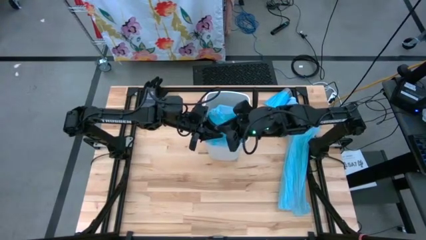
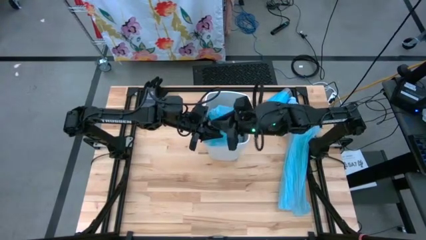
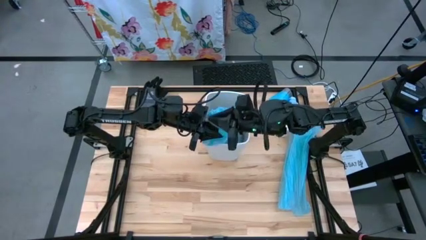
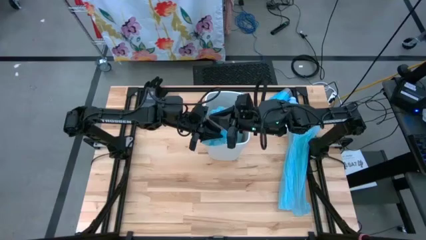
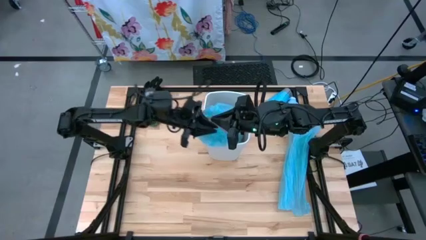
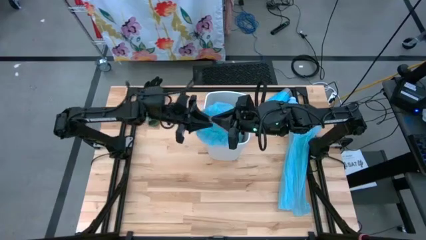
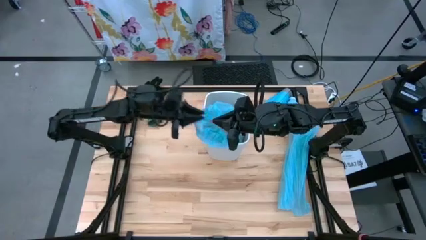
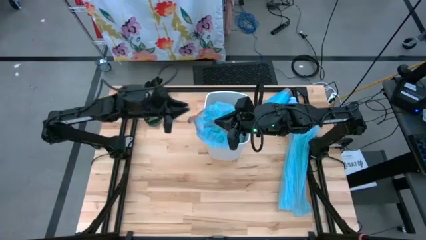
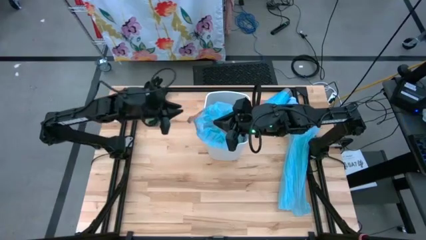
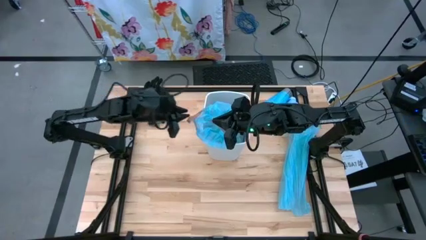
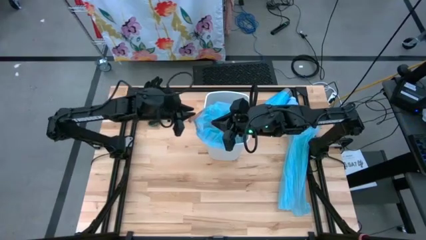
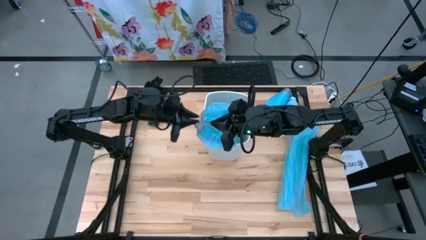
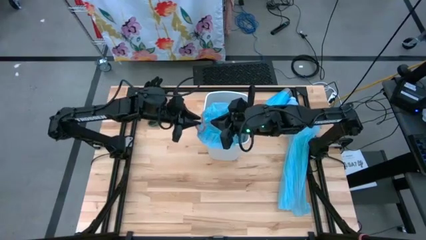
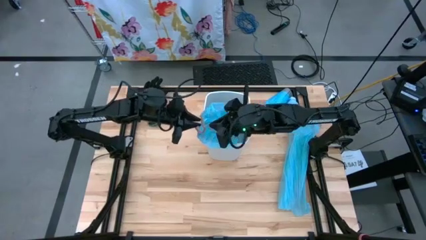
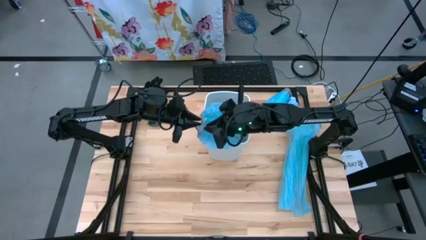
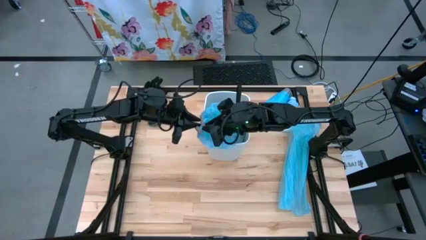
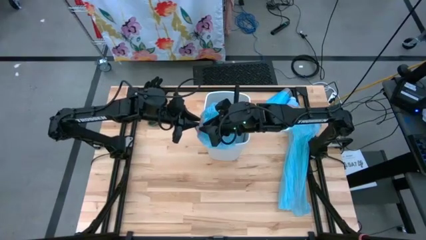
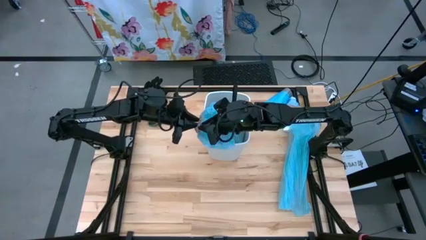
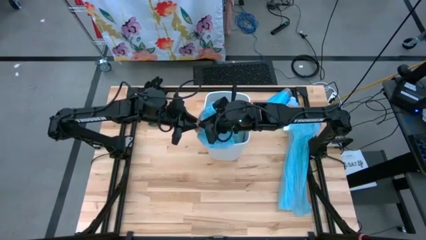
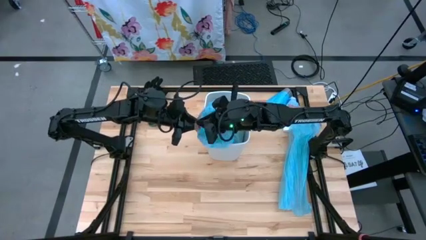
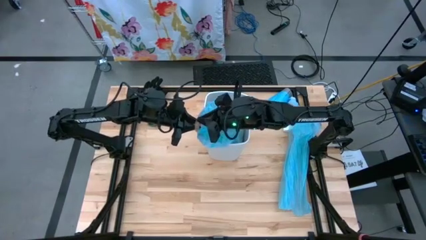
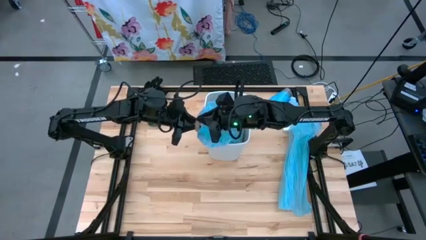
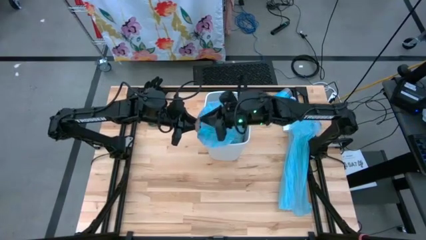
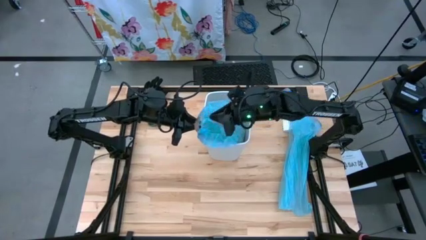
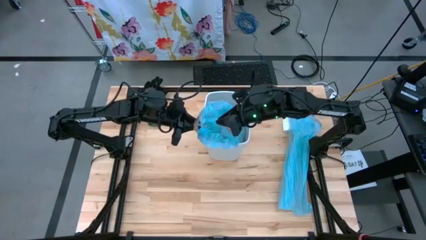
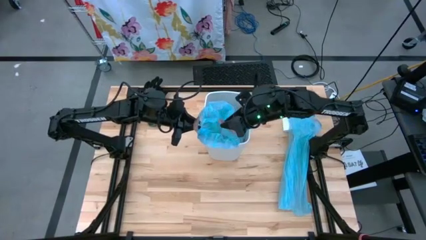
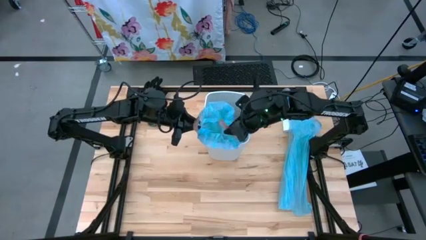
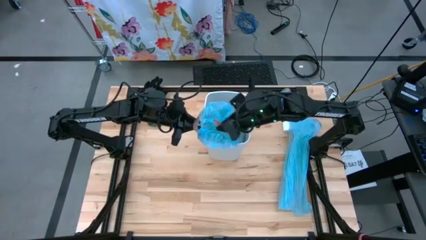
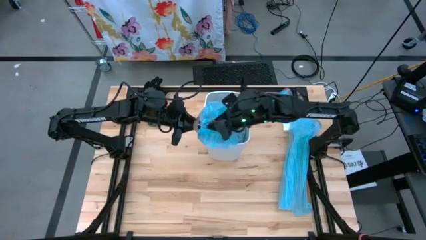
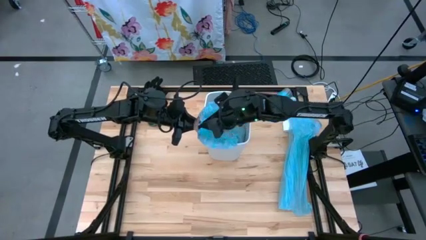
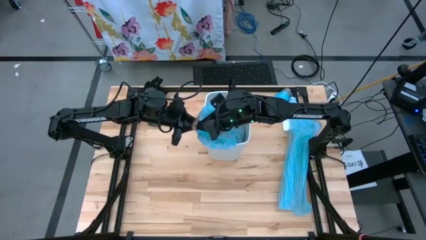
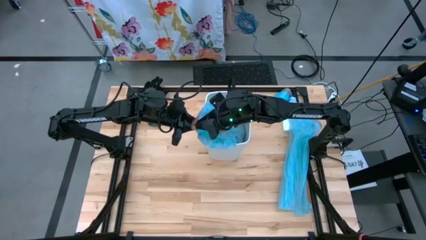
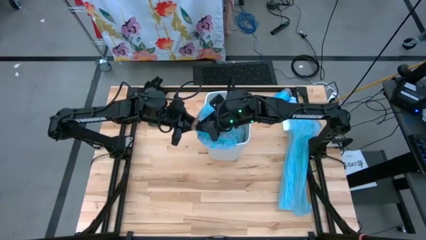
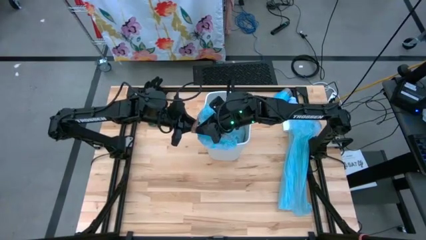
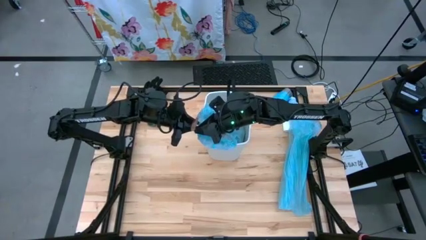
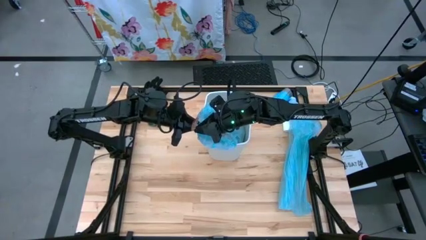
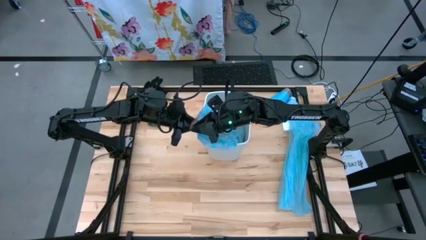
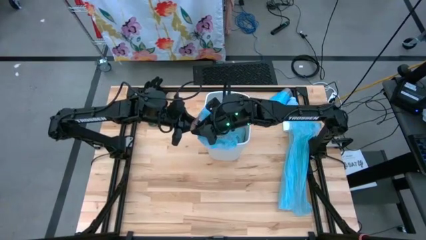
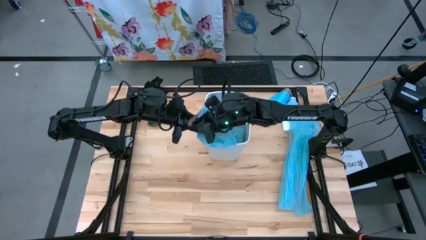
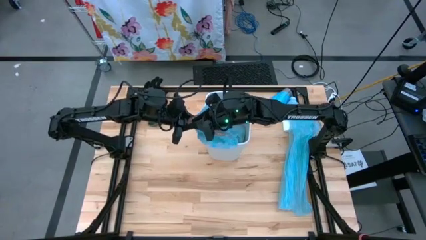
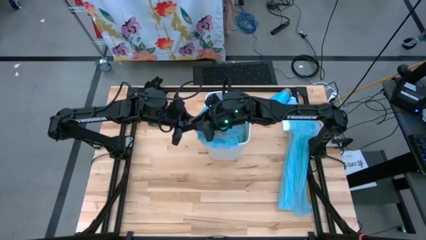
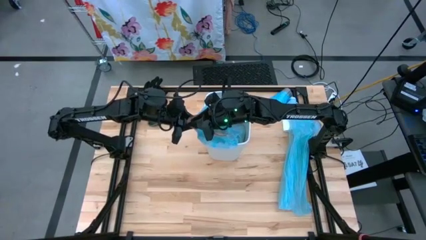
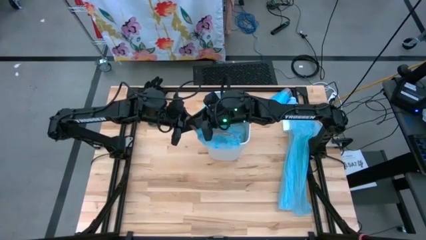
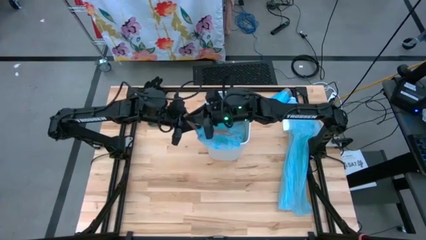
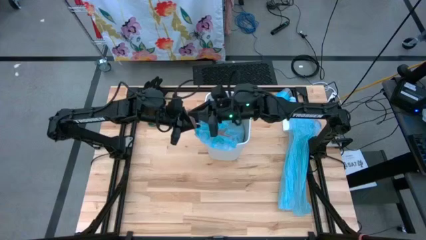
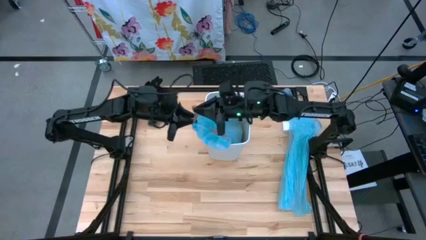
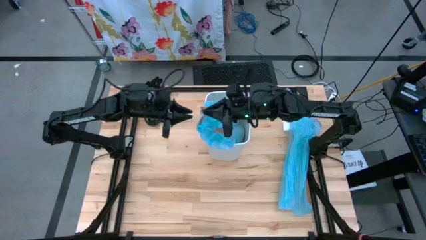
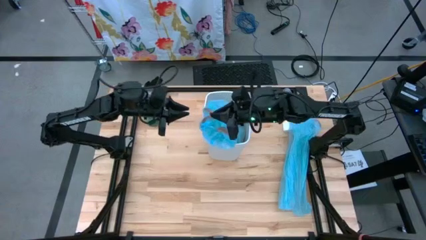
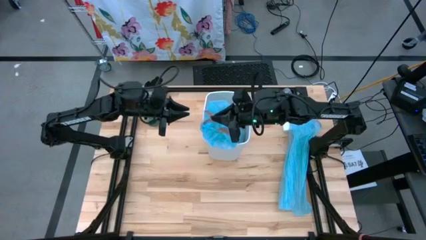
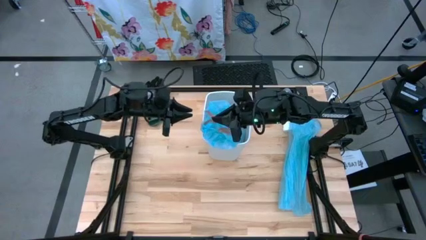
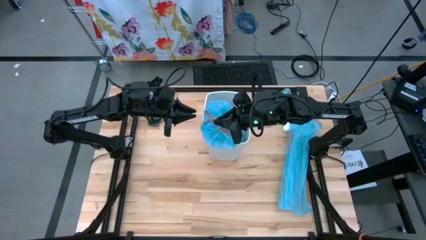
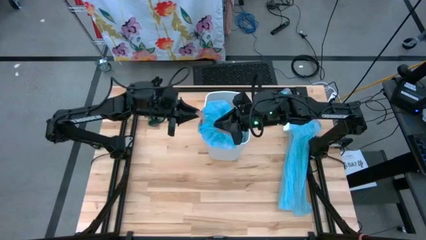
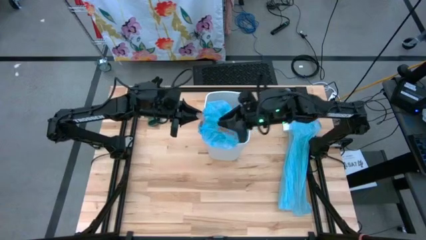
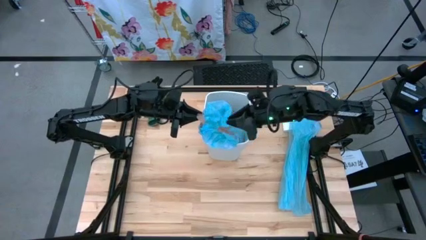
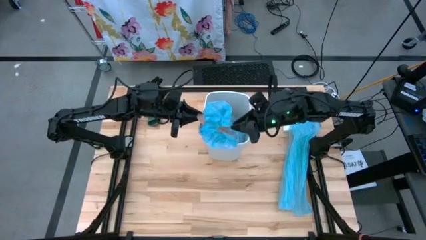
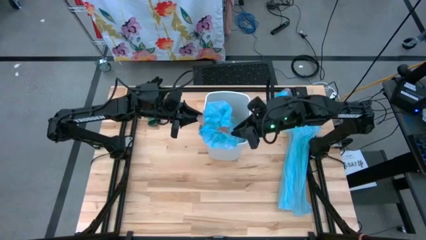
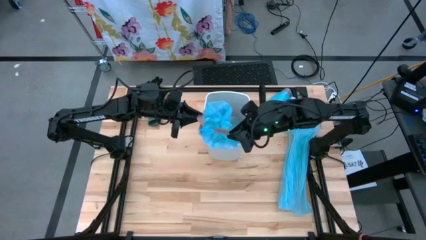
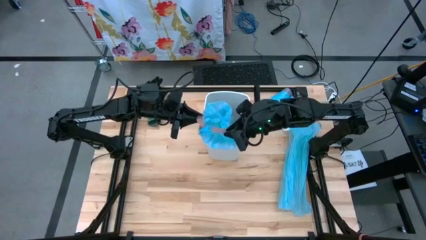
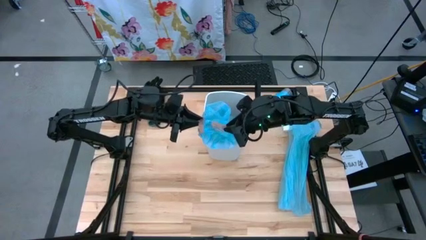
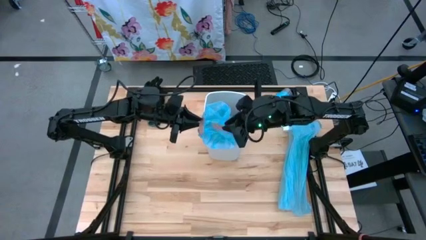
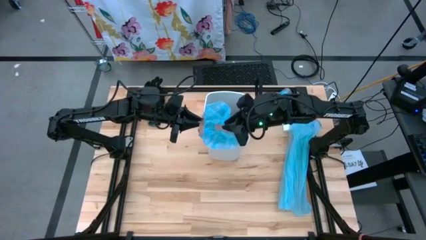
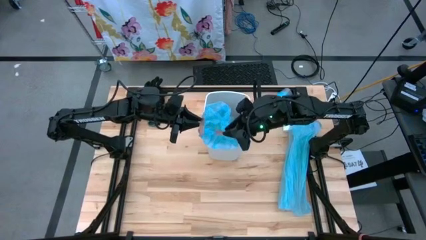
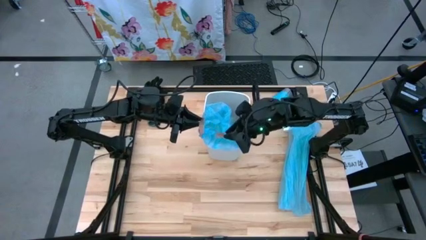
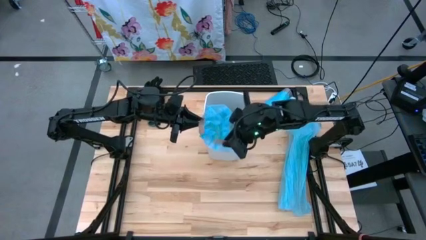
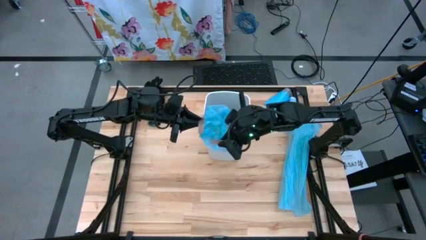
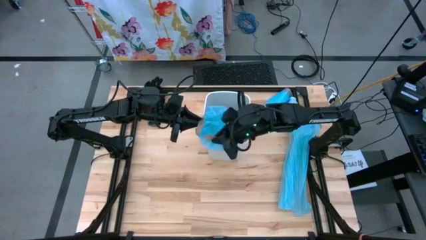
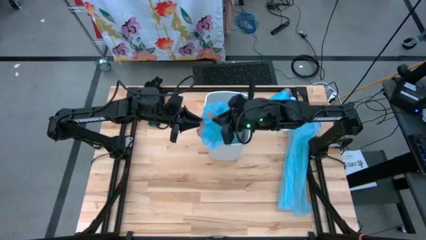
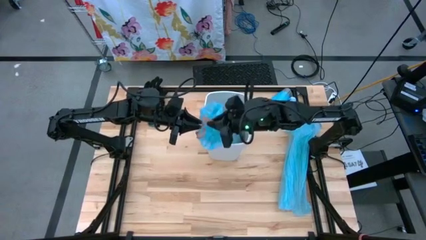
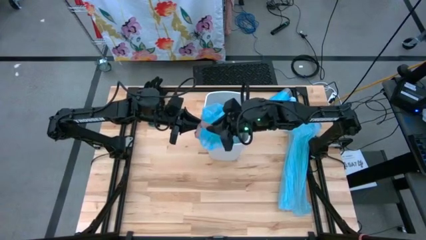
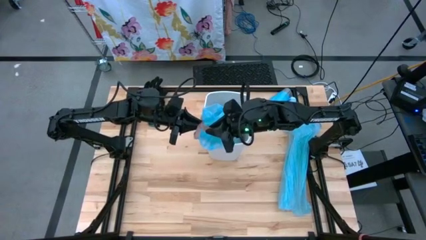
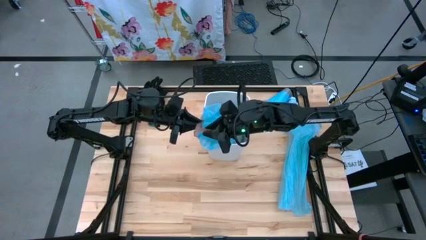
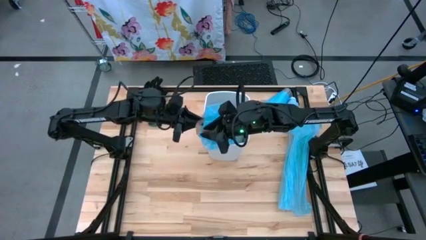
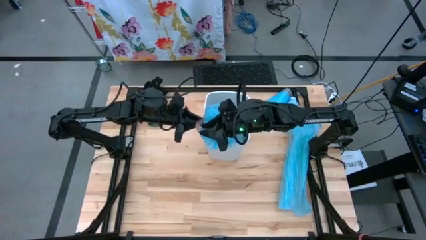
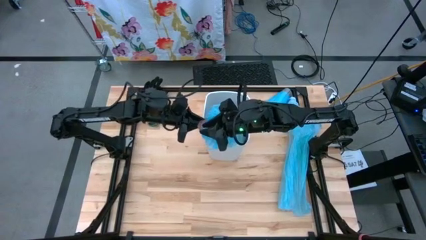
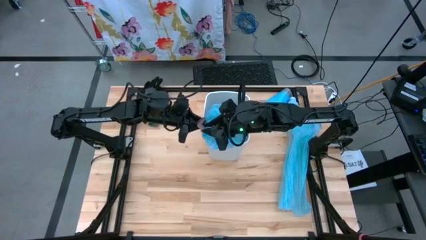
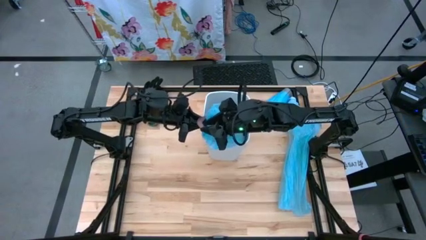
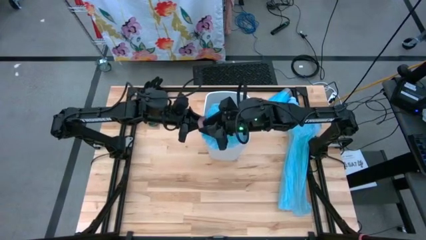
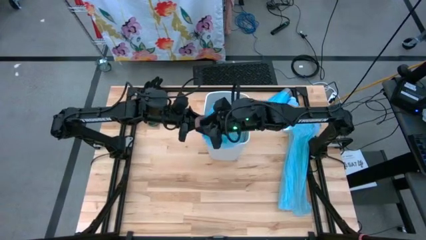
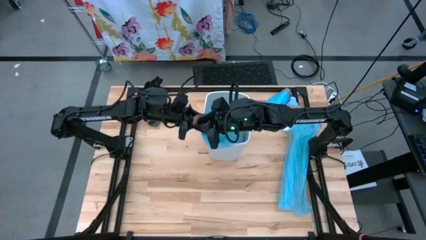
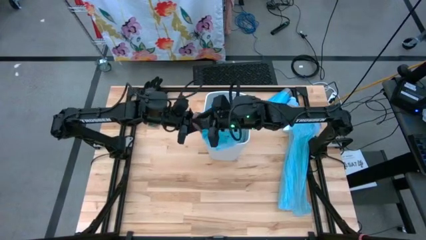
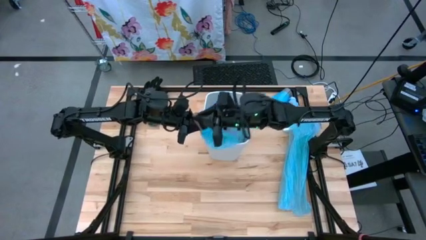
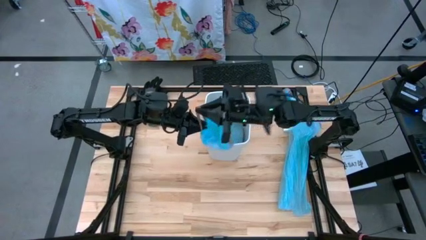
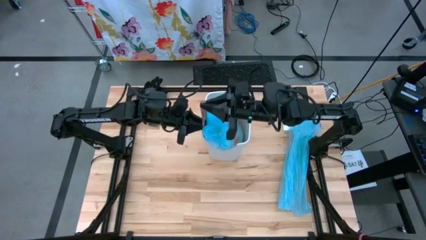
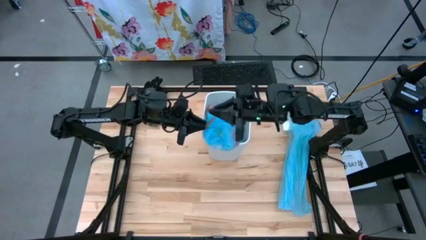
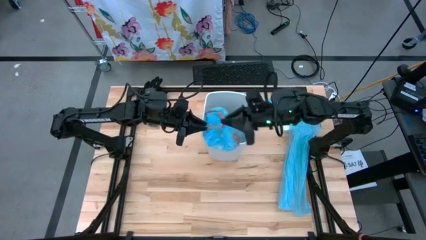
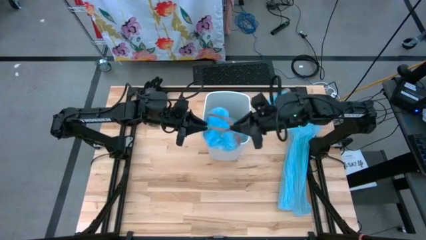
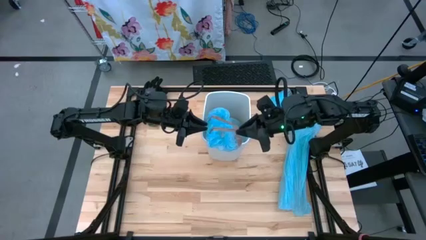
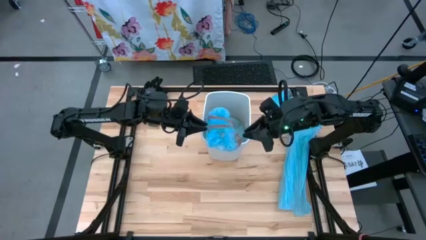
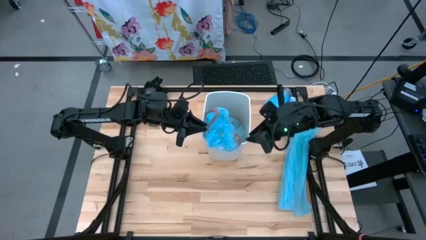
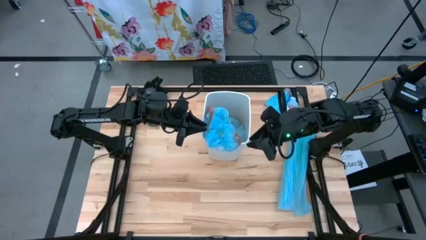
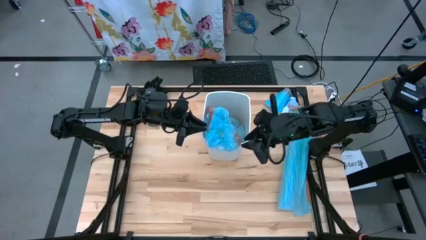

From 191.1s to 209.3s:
Task: place trash/remove bag and relplace
Close the trash bag
